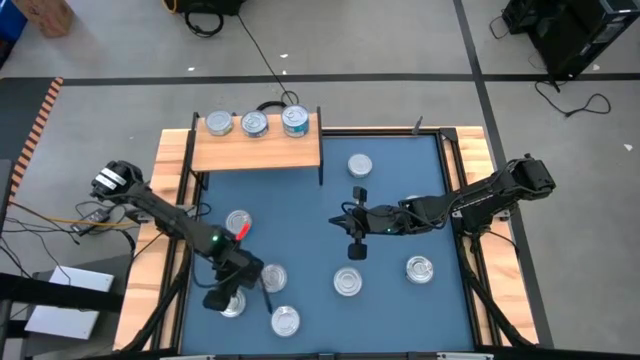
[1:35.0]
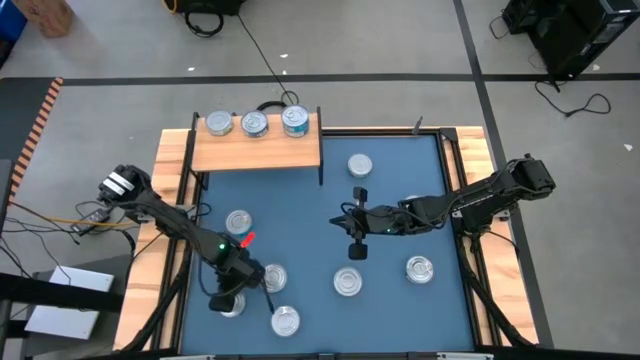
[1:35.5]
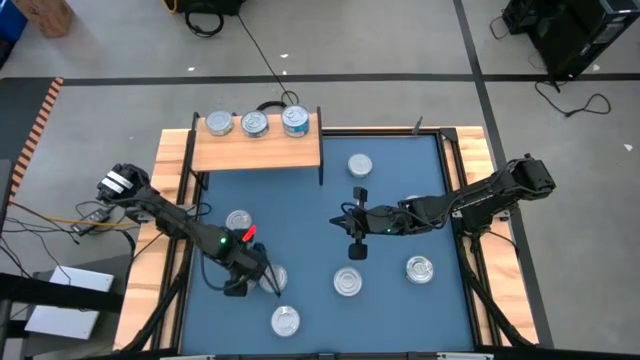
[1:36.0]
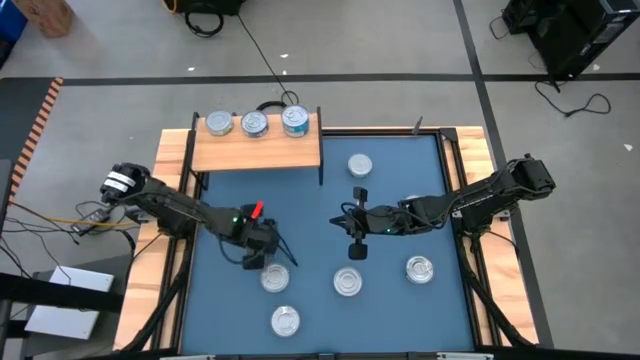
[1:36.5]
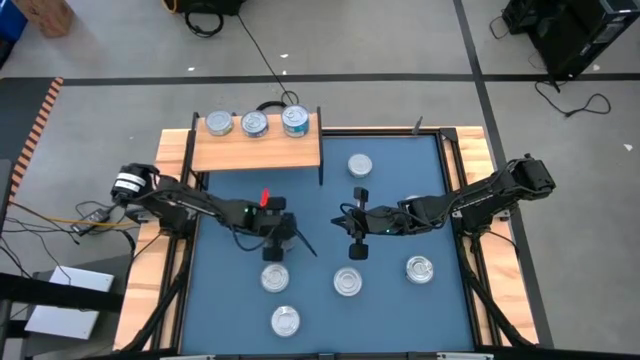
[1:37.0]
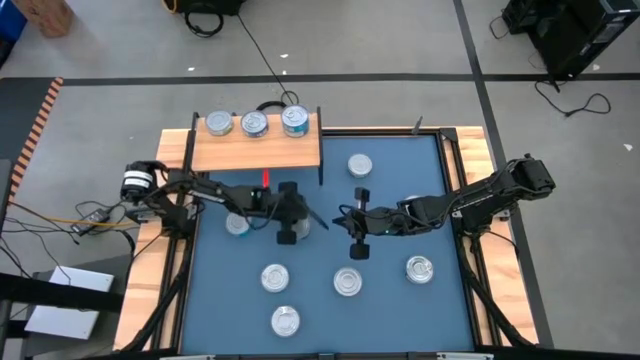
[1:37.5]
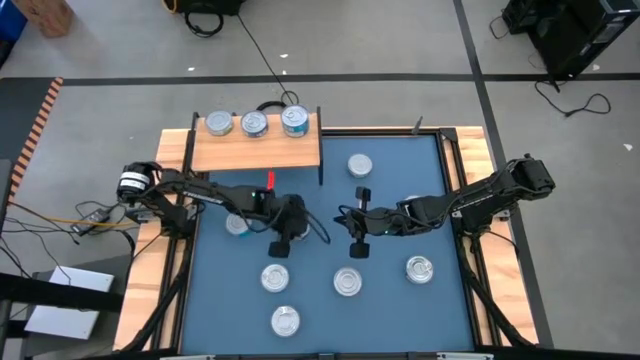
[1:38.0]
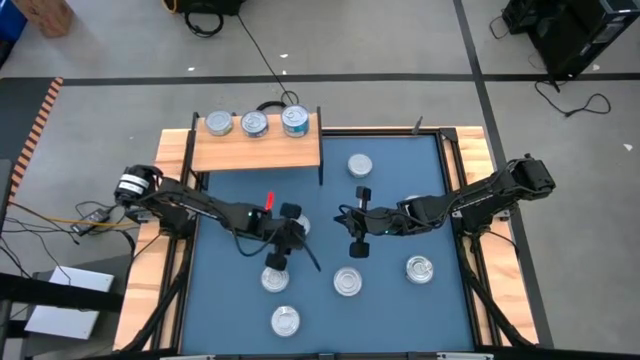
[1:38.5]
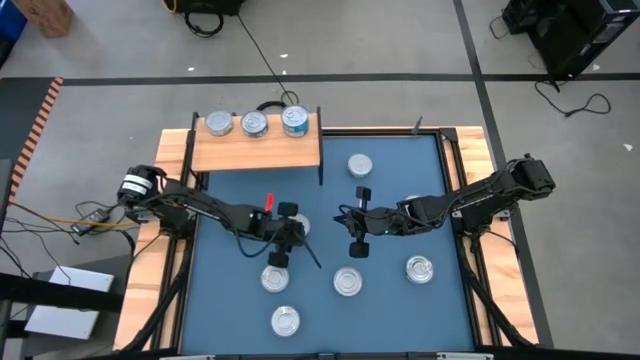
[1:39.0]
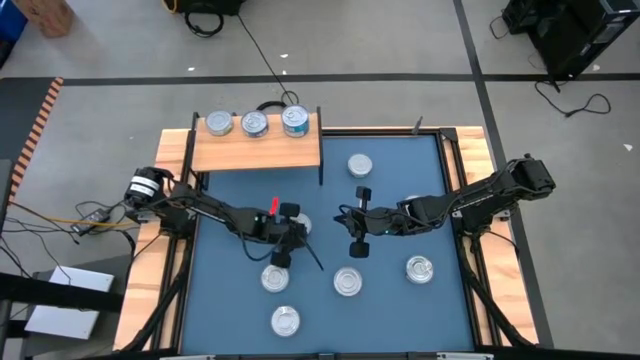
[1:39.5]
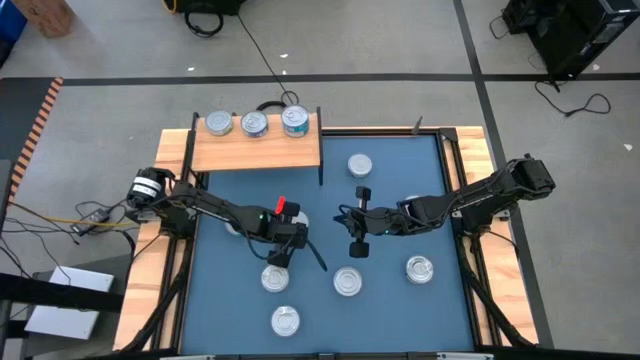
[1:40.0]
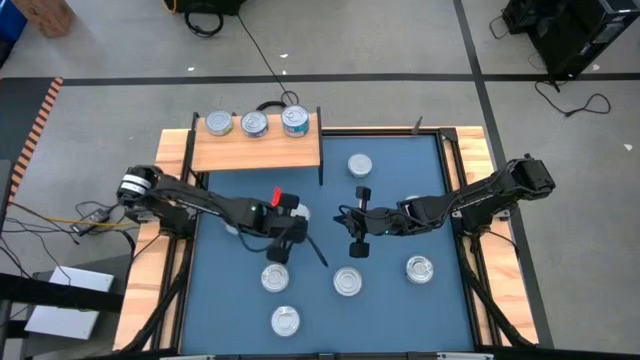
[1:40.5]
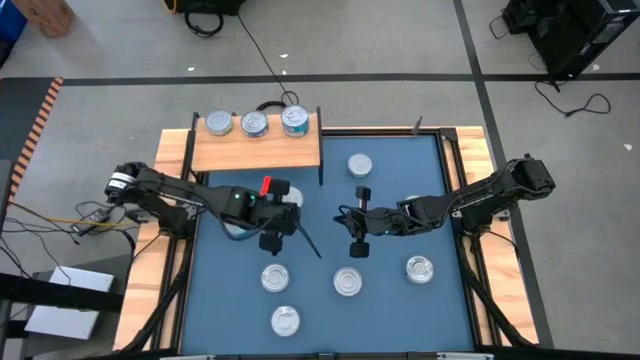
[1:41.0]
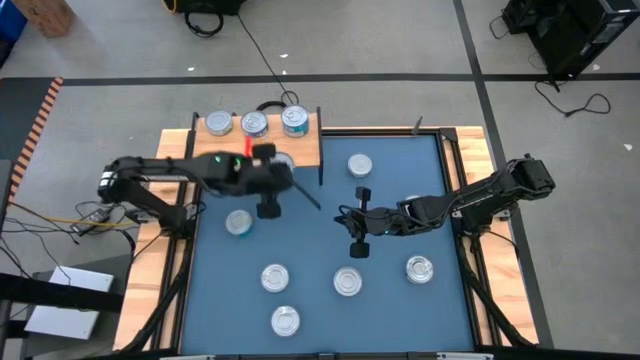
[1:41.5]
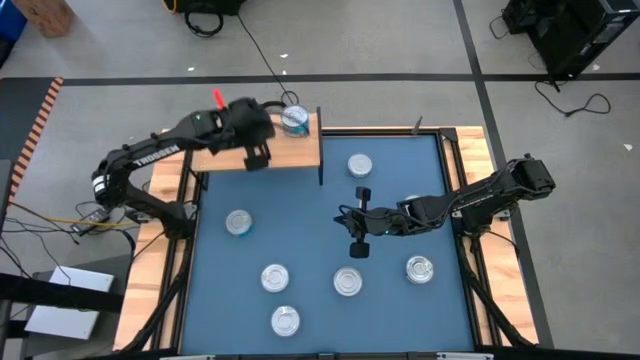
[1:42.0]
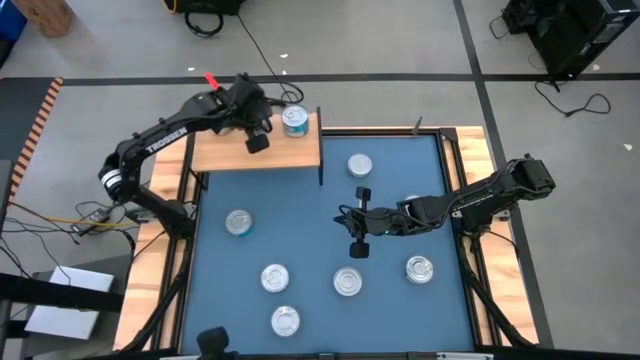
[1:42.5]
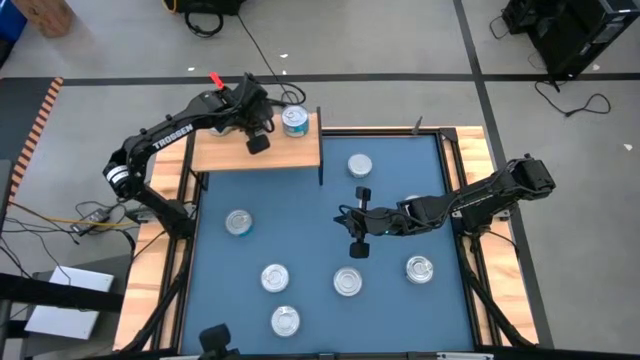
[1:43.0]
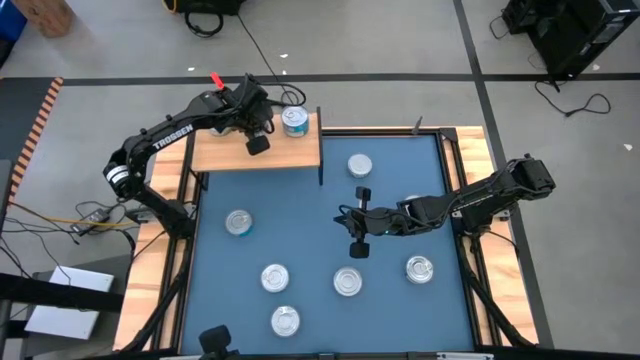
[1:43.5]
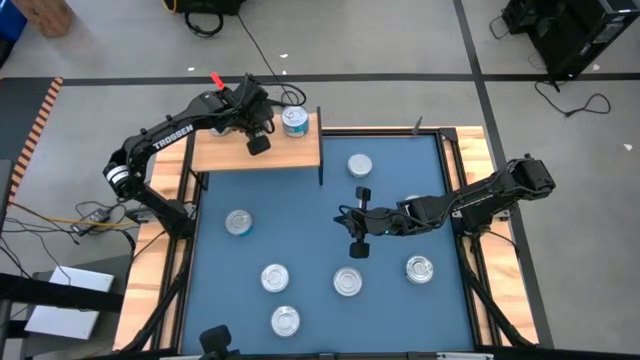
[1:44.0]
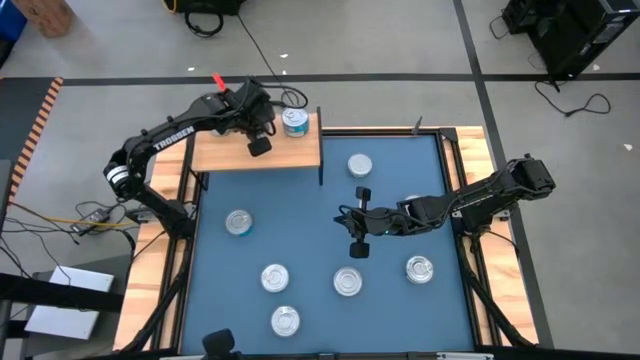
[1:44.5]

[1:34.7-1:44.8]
Task: Stack canned seafood by type on shelf
Stack the blue tuna can on top of blue tuna can on the shelf

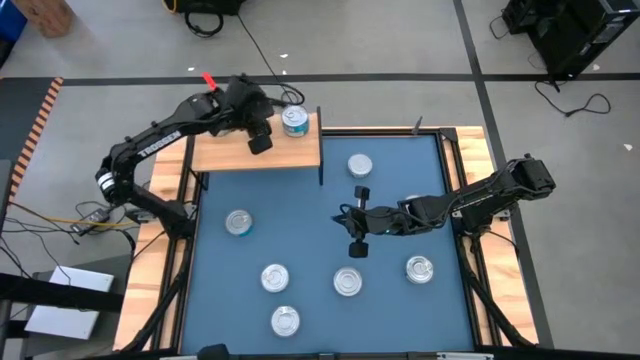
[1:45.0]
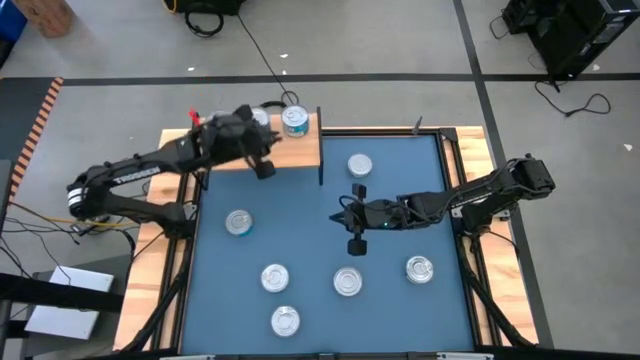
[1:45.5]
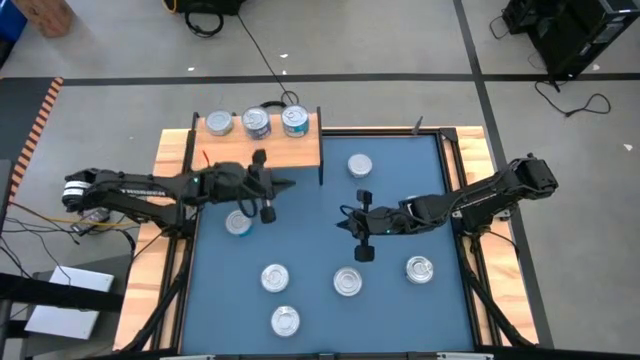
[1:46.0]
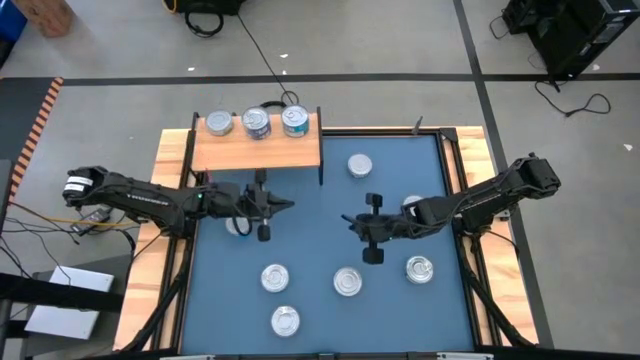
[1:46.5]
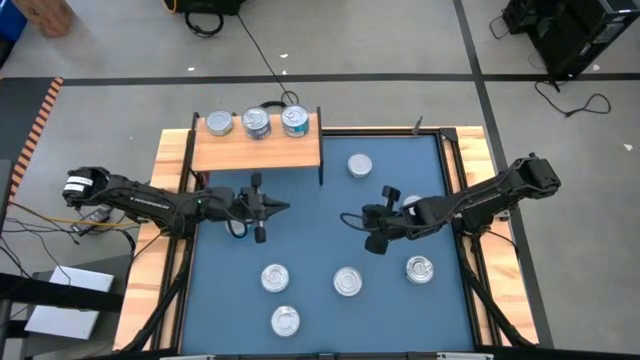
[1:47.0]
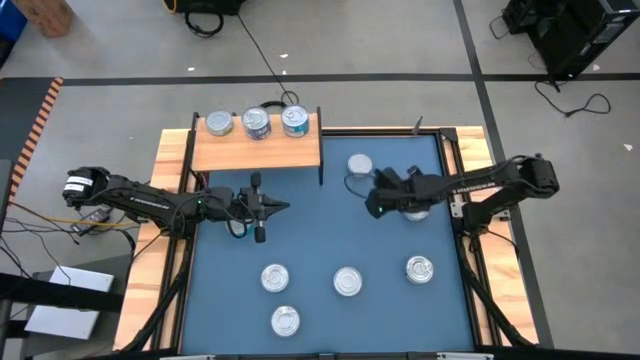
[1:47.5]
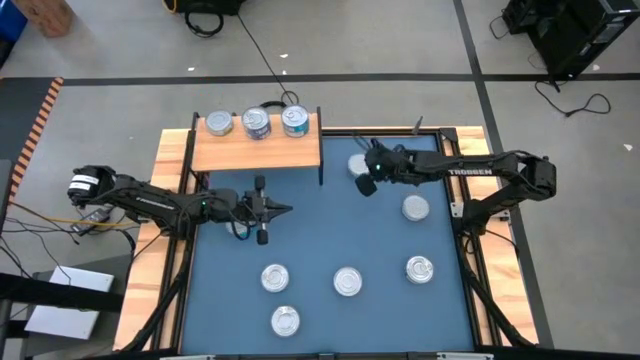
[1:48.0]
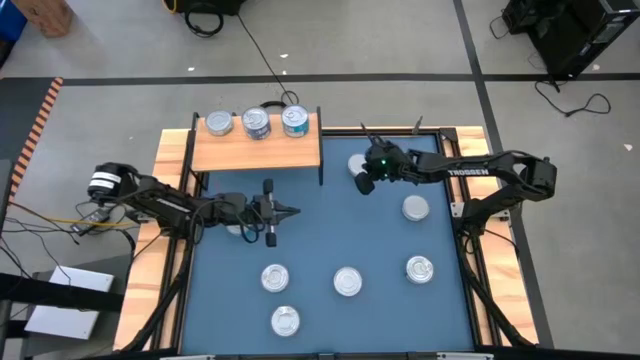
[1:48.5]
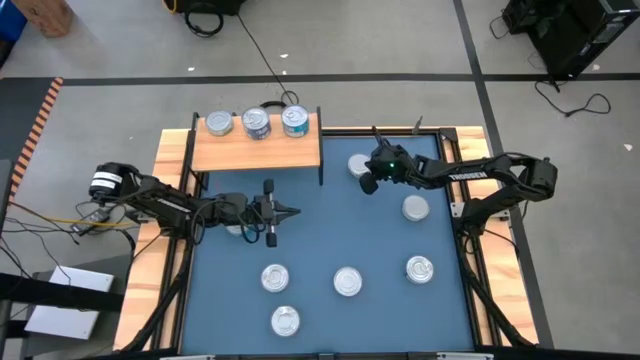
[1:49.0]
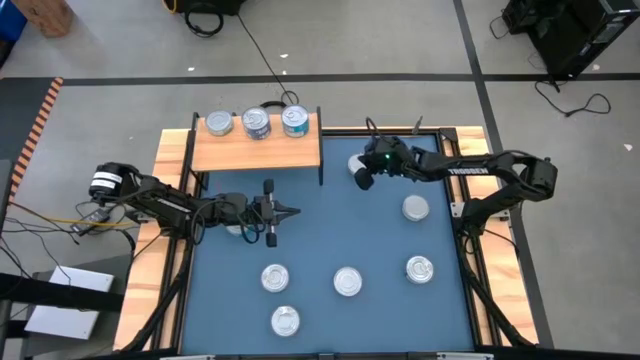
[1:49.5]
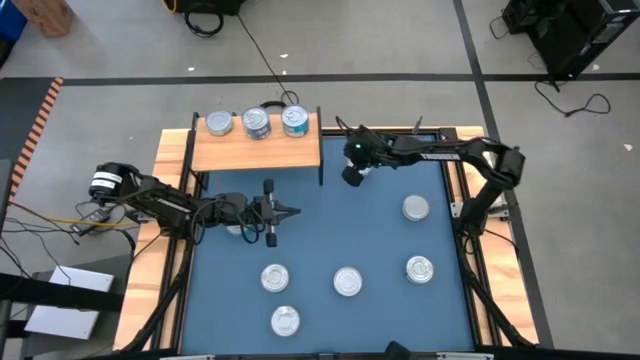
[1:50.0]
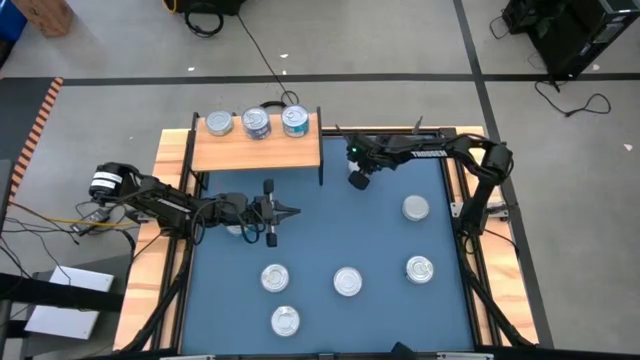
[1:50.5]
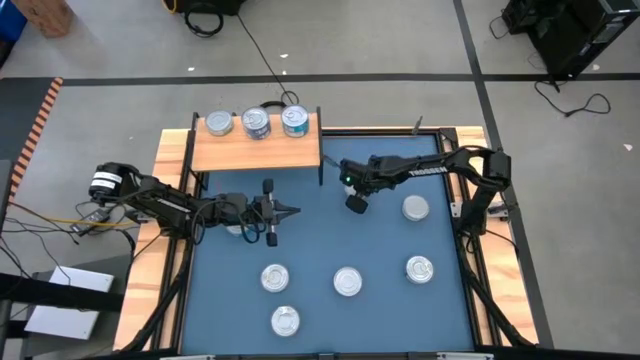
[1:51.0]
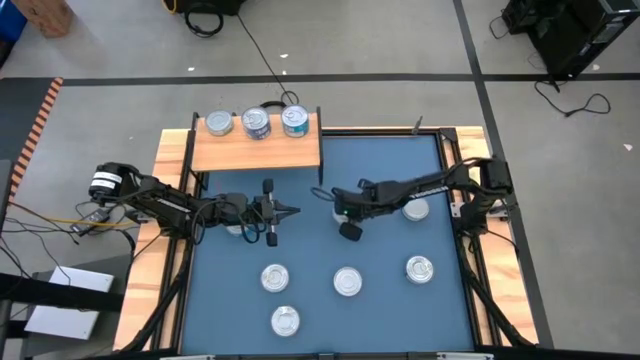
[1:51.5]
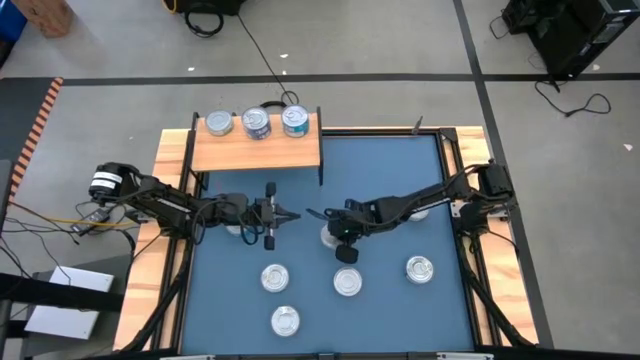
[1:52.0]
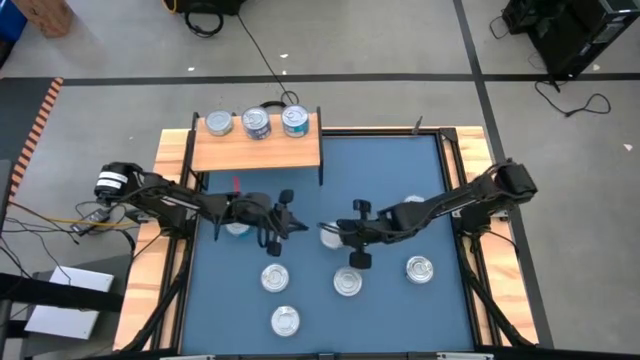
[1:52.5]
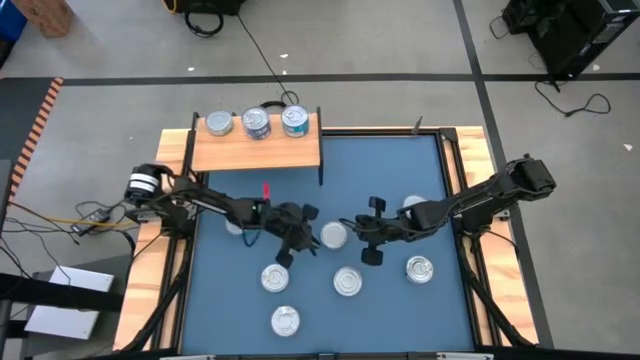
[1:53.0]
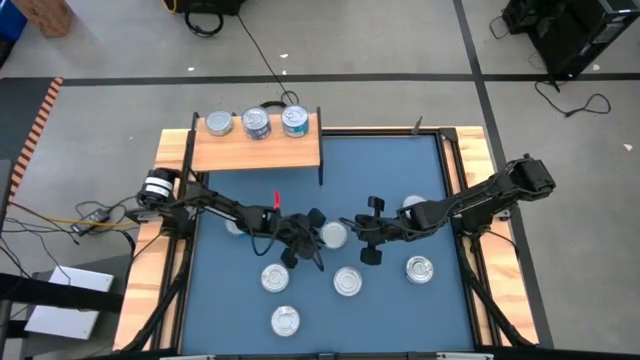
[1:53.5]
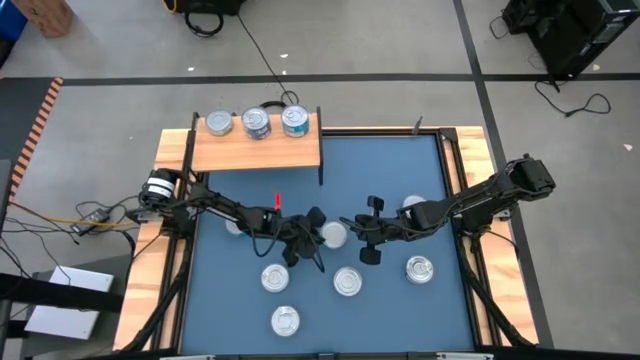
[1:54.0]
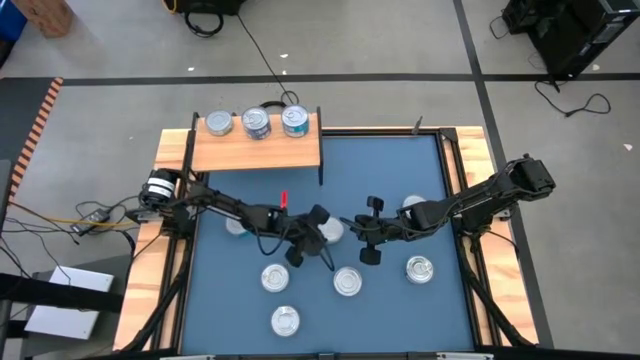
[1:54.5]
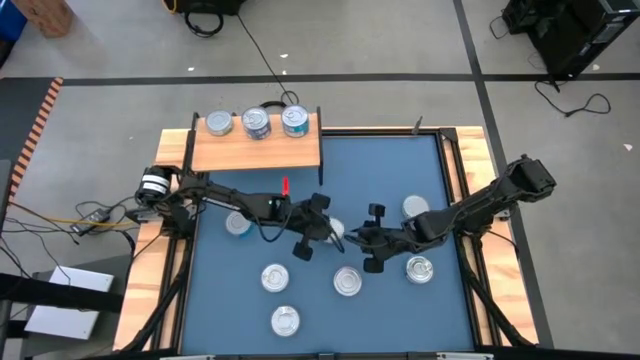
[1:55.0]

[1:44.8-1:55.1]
Stack the green white tuna can on top of the green white tuna can on the shelf
